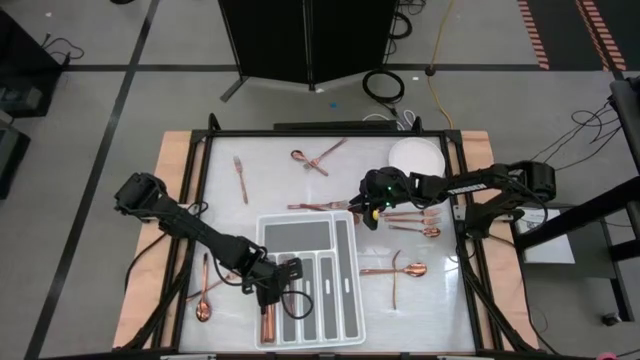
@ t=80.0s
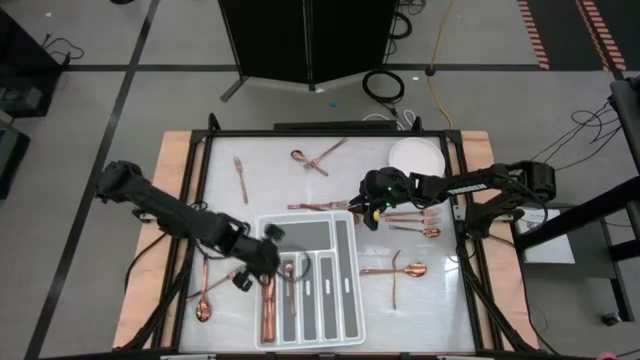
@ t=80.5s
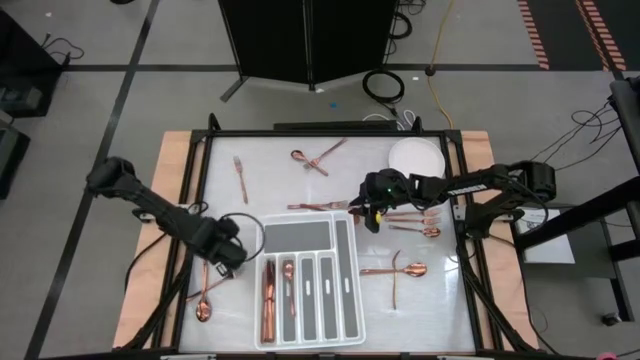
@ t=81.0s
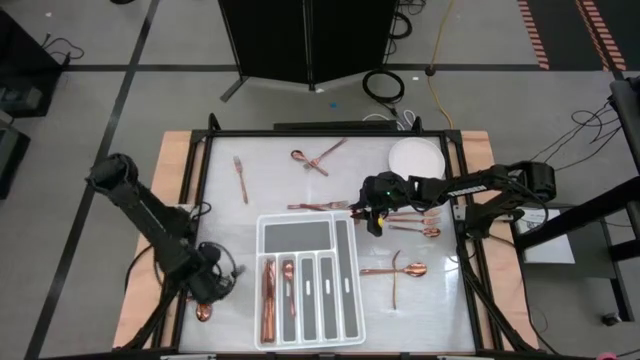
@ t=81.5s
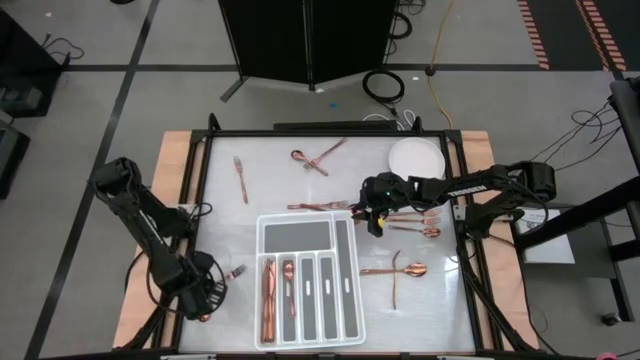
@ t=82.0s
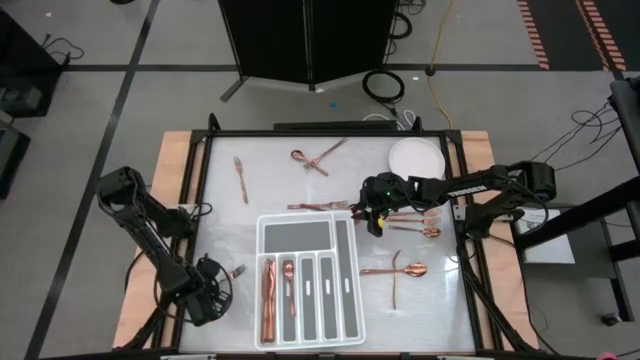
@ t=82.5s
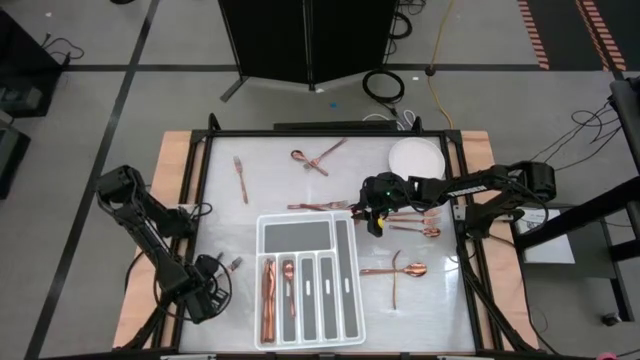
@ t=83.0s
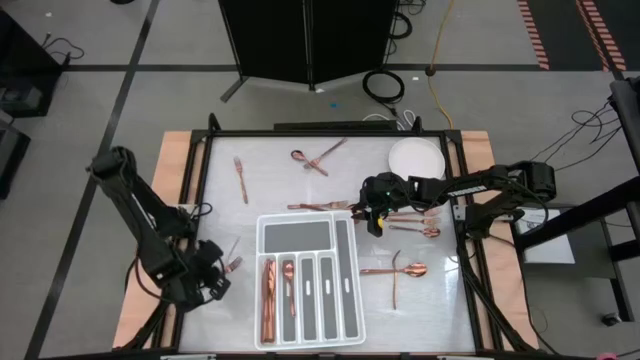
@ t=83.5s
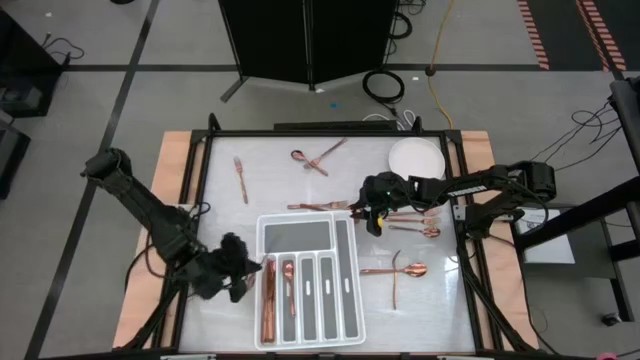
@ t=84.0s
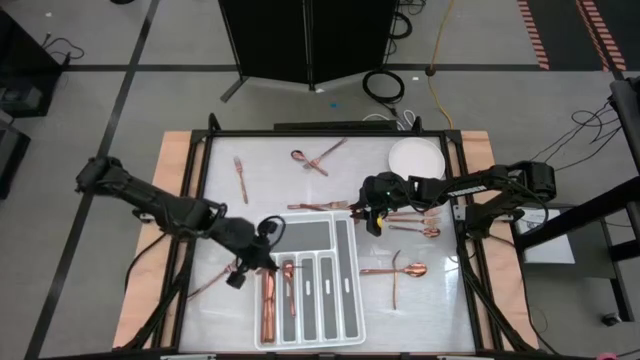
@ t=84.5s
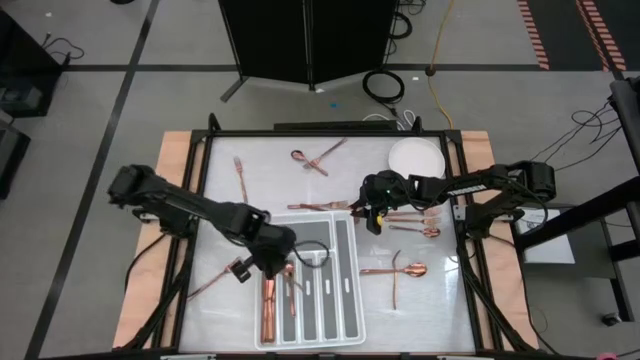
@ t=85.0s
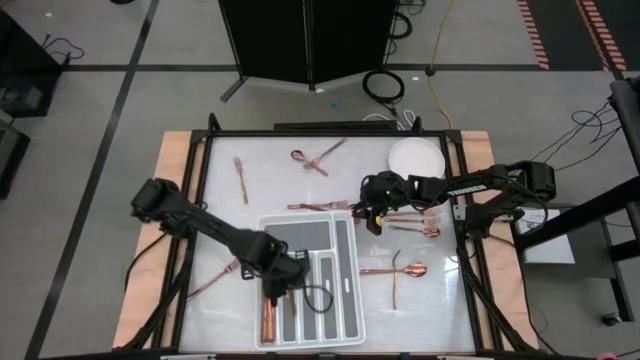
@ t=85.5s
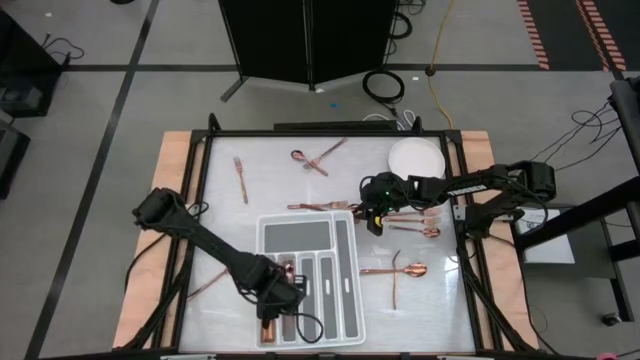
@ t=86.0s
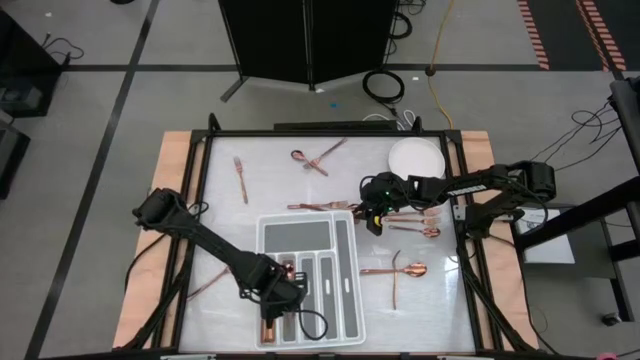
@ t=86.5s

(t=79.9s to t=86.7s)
Task: Sort silverware
Put the spoon into the silverware tray

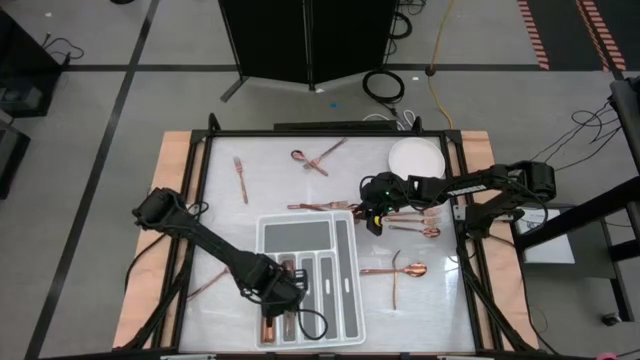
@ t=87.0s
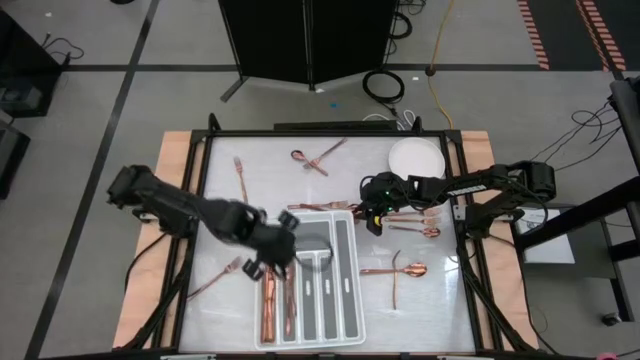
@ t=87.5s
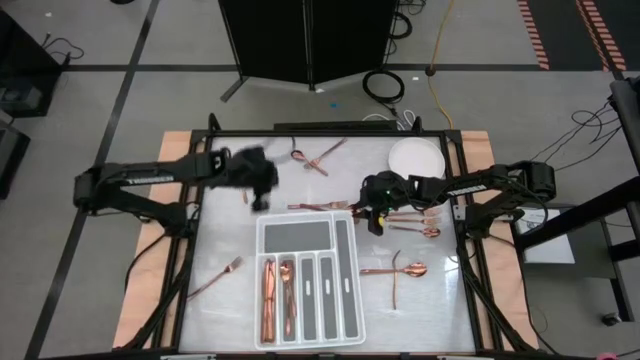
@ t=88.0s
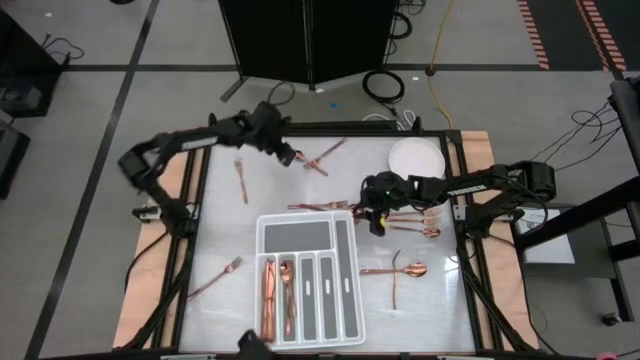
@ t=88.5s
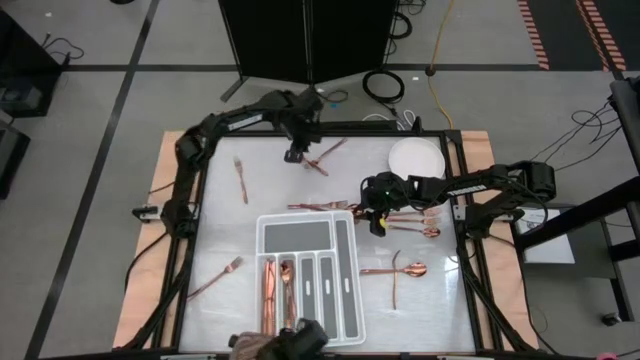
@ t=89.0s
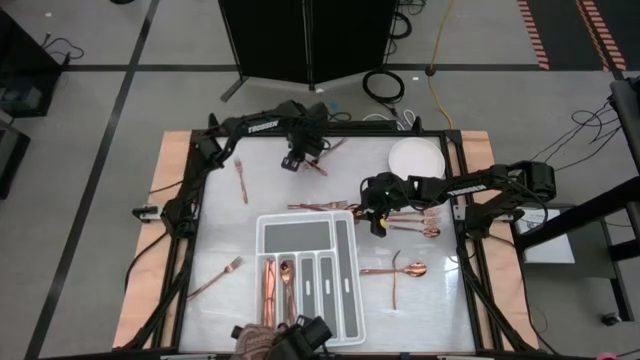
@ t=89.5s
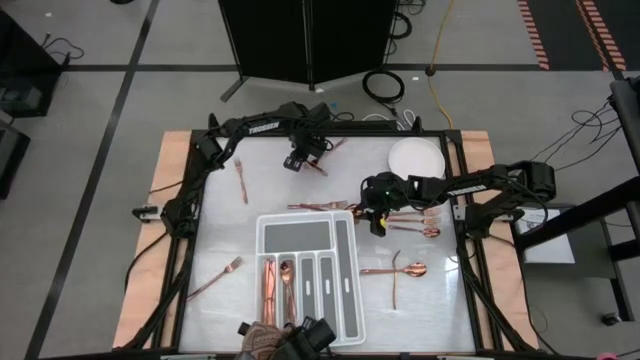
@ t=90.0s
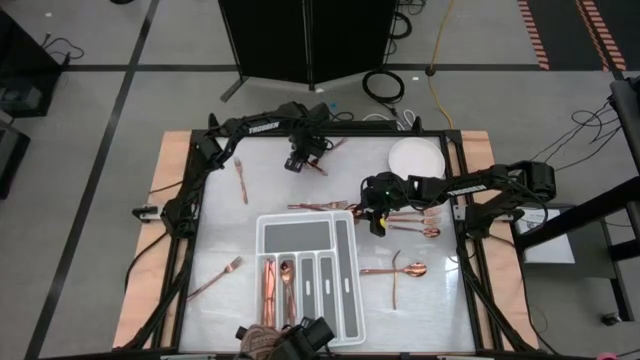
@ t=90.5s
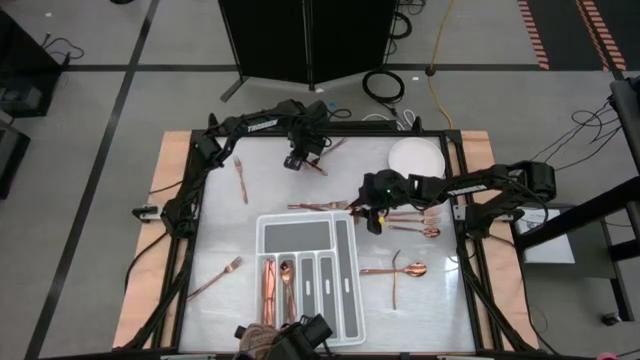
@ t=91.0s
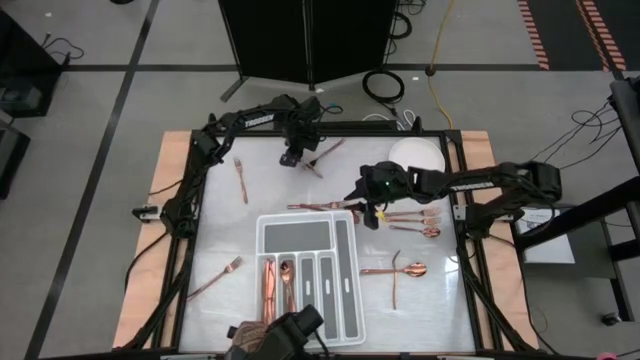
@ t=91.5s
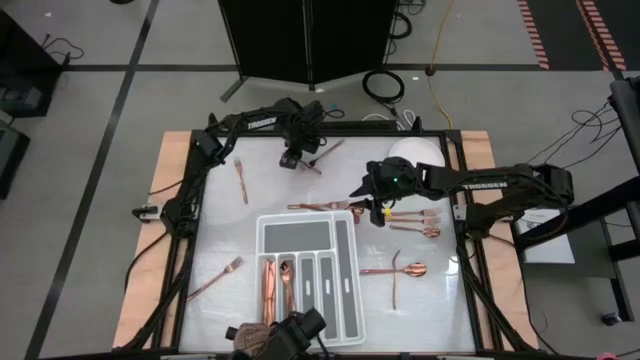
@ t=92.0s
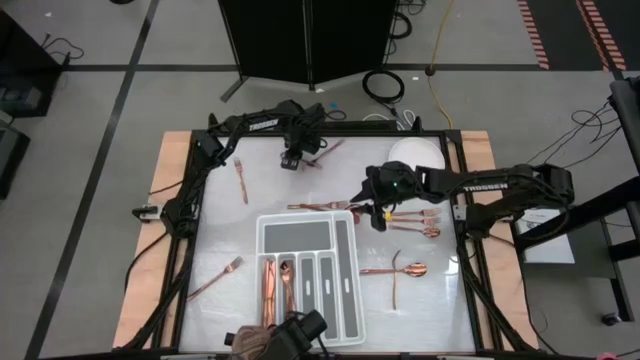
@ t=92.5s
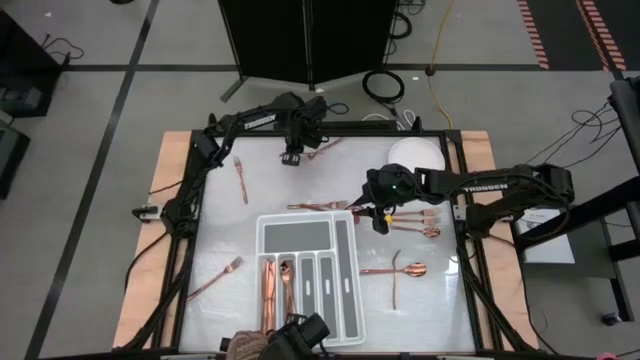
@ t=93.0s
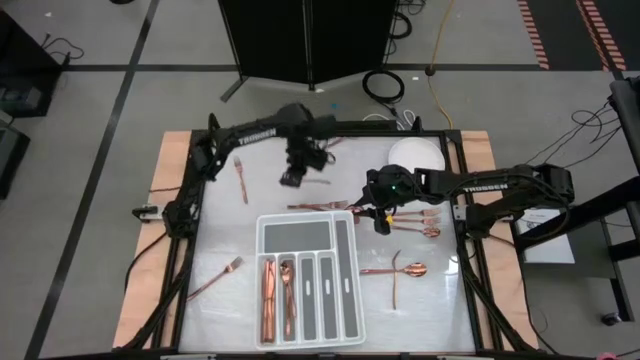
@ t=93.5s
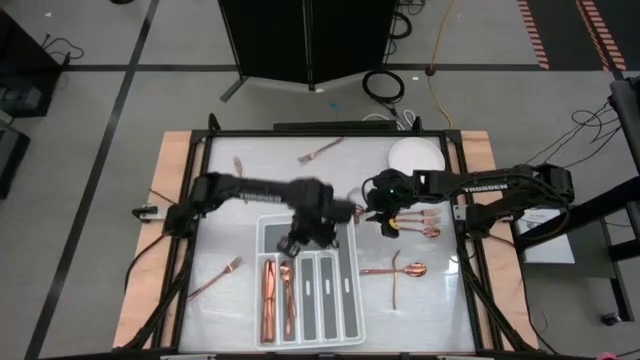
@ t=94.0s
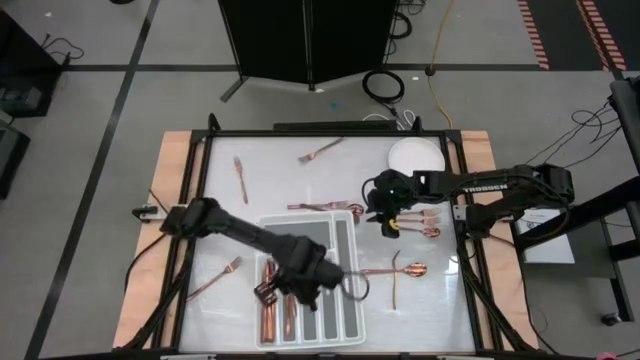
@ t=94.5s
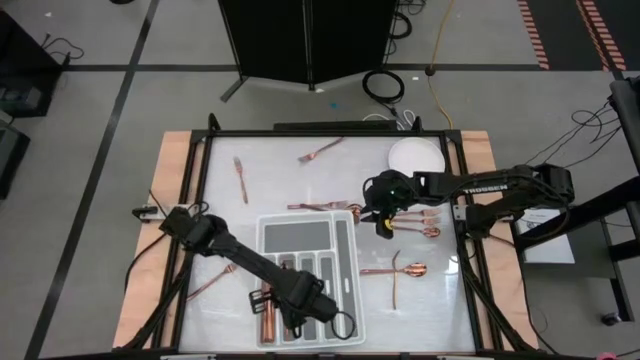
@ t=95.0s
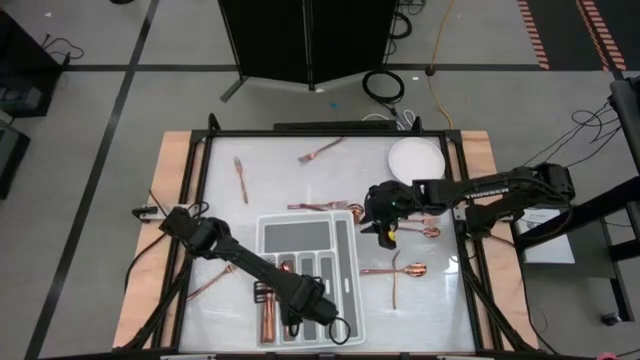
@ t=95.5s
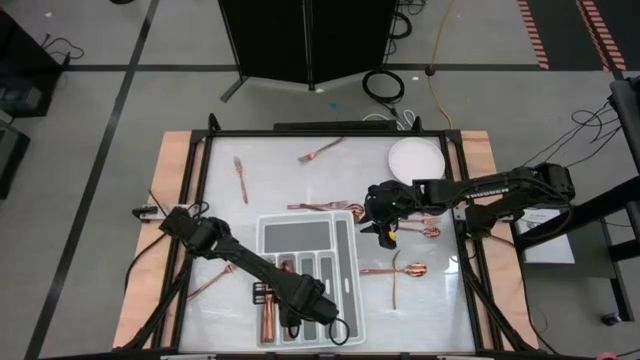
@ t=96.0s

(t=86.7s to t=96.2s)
Put the spoon into the silverware tray
